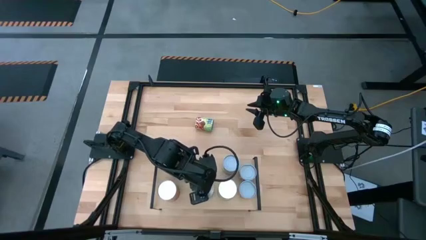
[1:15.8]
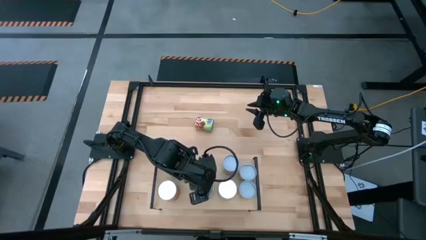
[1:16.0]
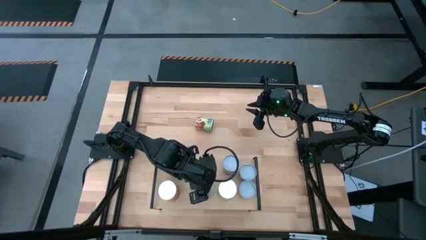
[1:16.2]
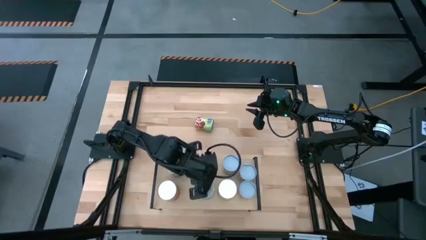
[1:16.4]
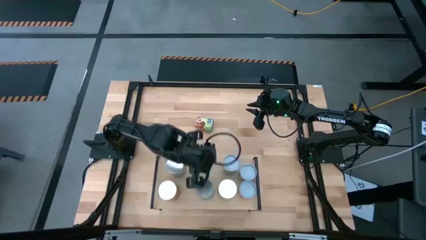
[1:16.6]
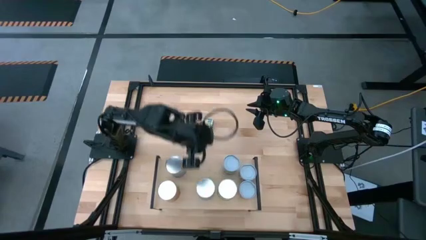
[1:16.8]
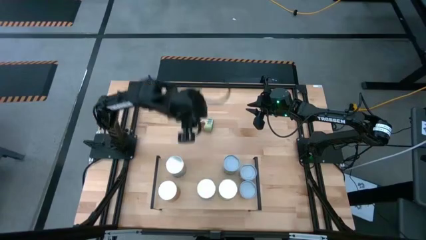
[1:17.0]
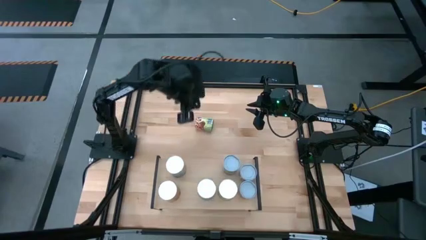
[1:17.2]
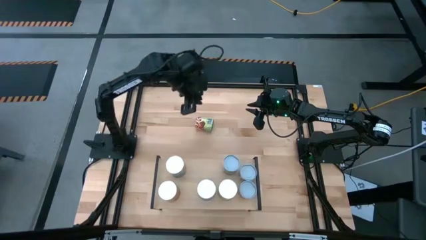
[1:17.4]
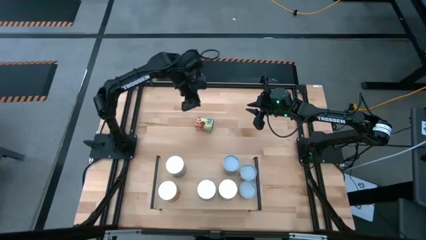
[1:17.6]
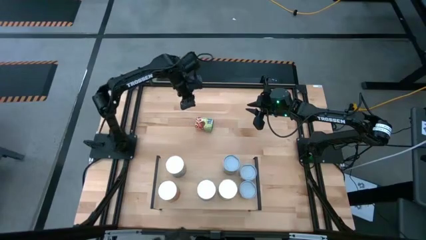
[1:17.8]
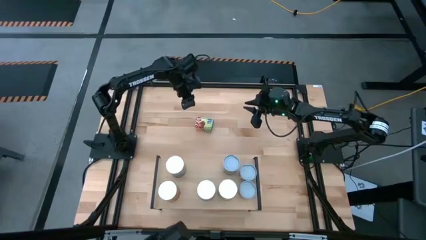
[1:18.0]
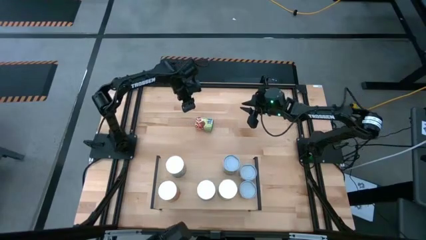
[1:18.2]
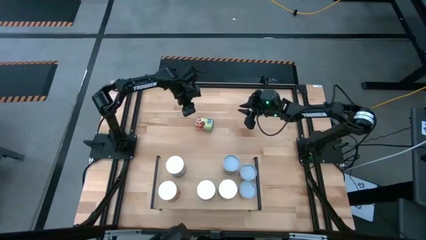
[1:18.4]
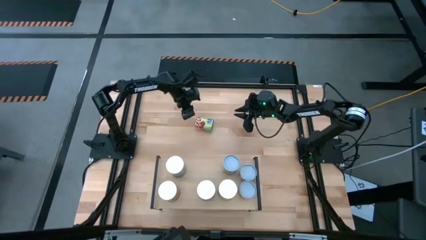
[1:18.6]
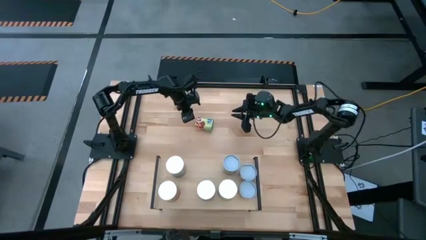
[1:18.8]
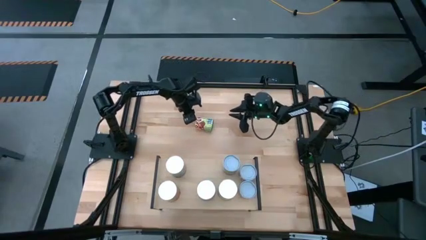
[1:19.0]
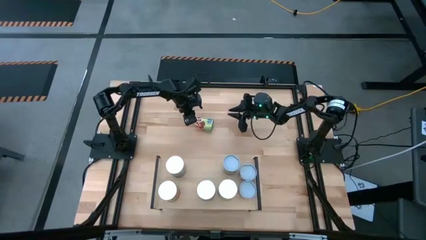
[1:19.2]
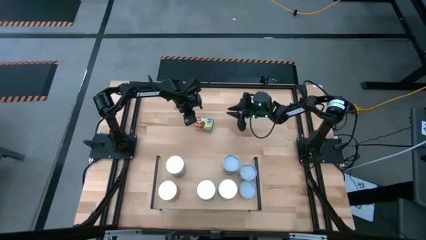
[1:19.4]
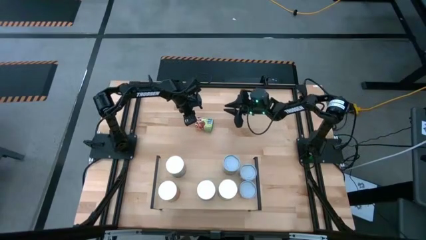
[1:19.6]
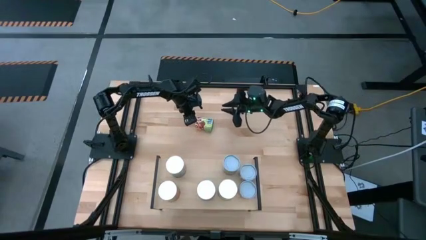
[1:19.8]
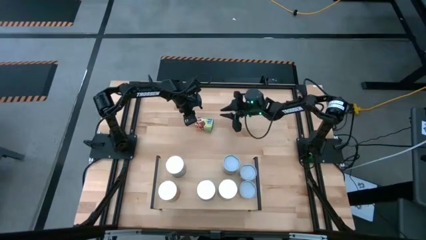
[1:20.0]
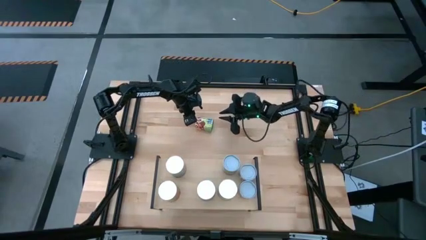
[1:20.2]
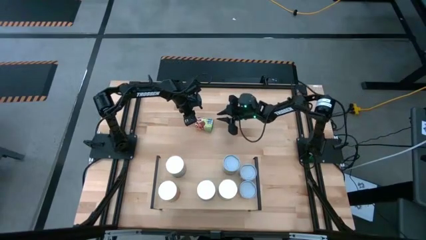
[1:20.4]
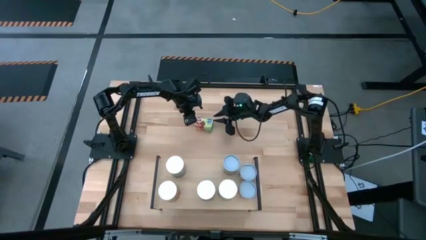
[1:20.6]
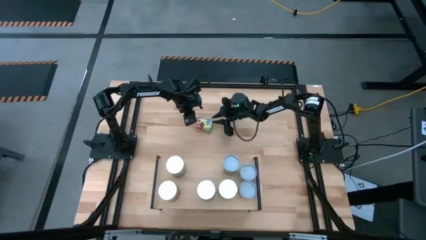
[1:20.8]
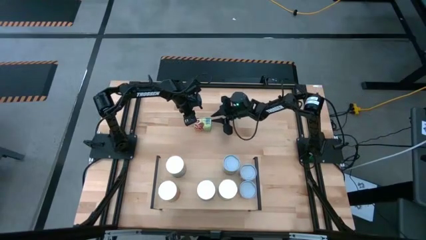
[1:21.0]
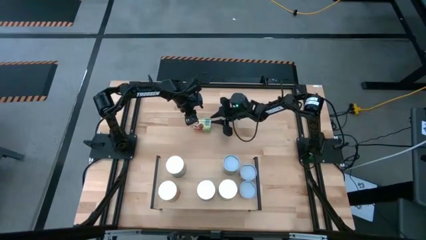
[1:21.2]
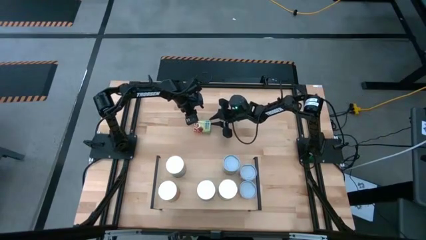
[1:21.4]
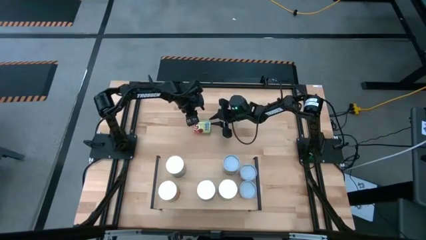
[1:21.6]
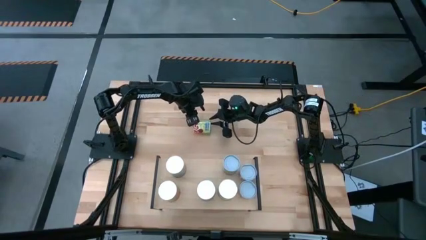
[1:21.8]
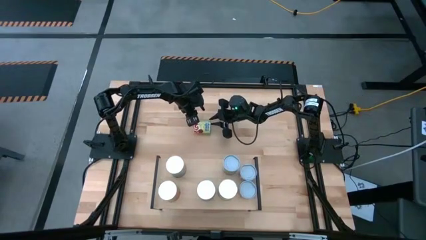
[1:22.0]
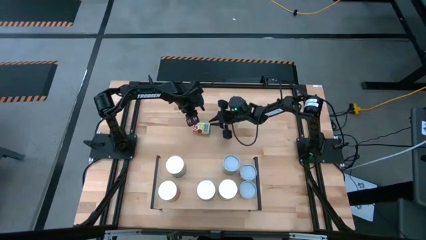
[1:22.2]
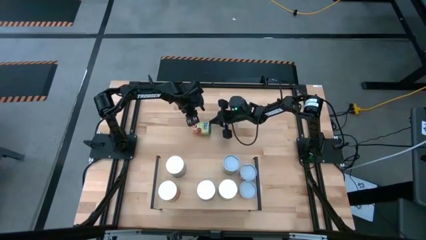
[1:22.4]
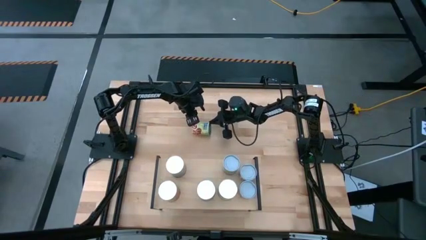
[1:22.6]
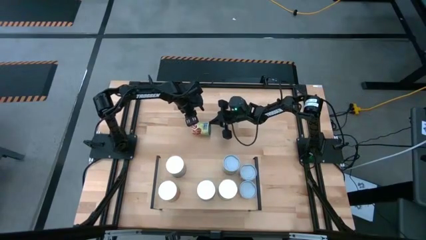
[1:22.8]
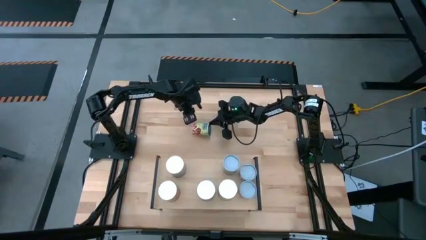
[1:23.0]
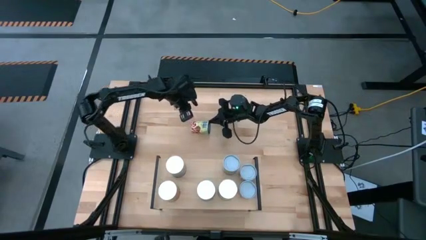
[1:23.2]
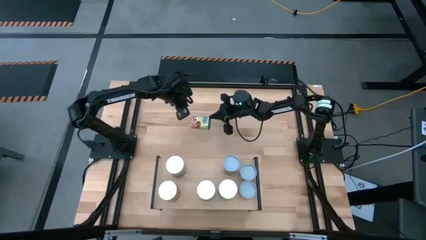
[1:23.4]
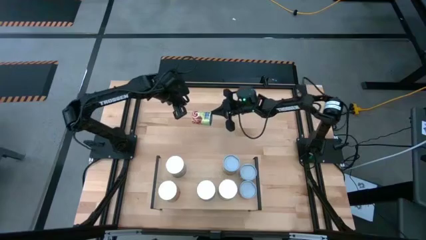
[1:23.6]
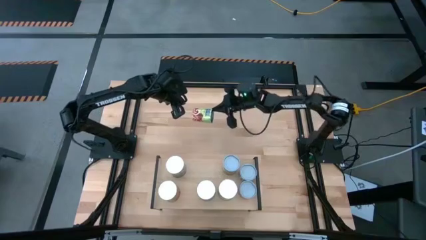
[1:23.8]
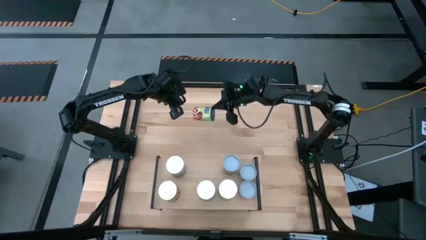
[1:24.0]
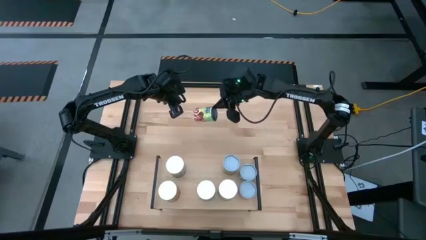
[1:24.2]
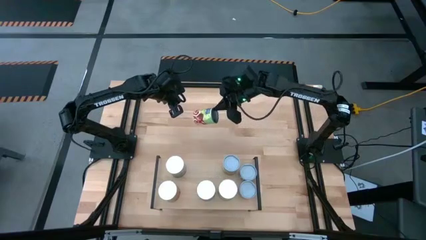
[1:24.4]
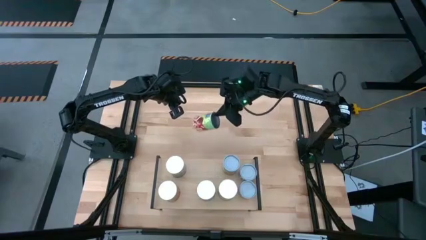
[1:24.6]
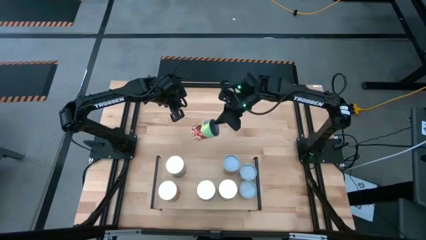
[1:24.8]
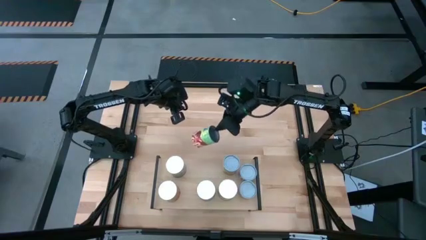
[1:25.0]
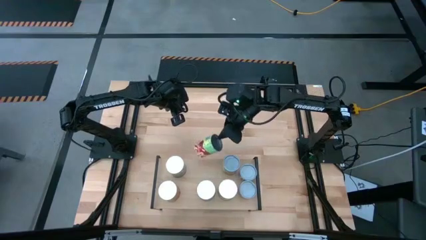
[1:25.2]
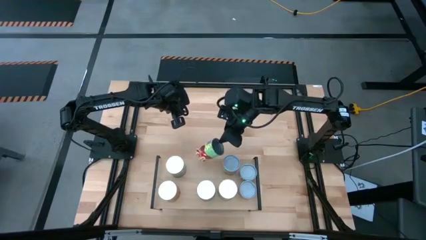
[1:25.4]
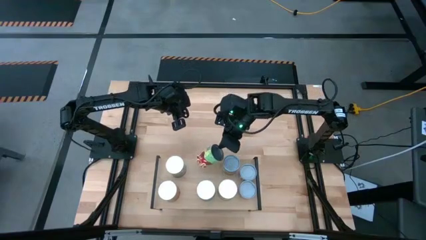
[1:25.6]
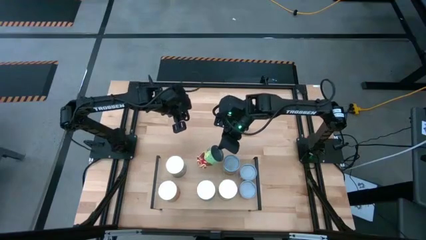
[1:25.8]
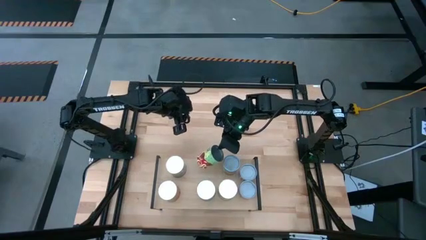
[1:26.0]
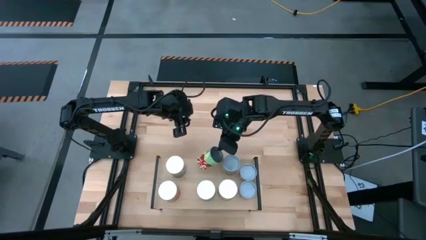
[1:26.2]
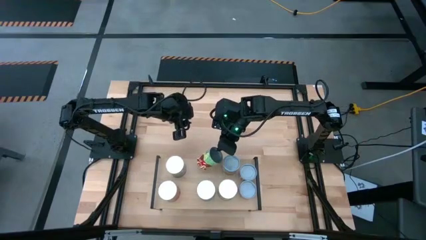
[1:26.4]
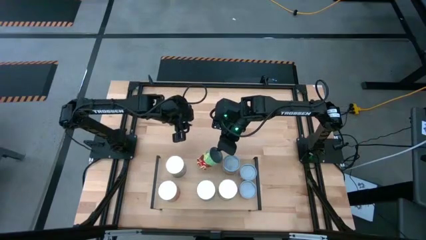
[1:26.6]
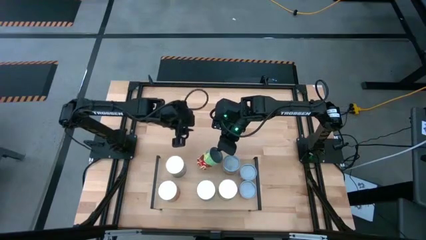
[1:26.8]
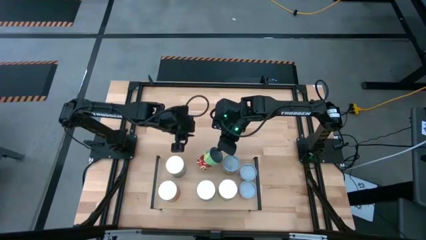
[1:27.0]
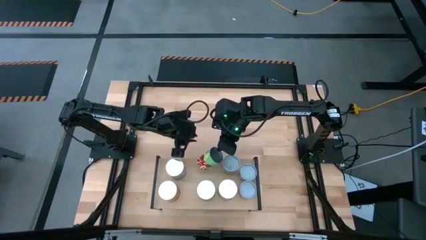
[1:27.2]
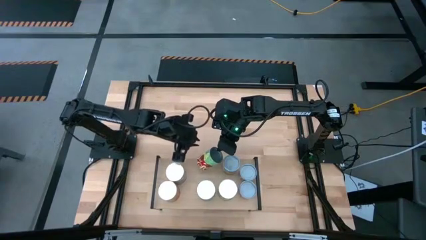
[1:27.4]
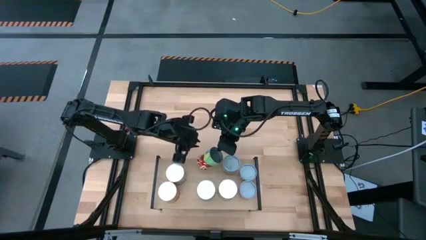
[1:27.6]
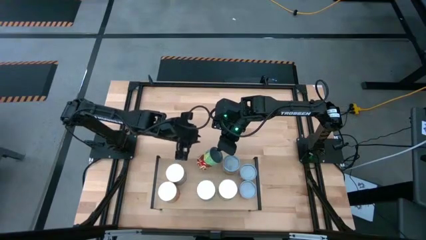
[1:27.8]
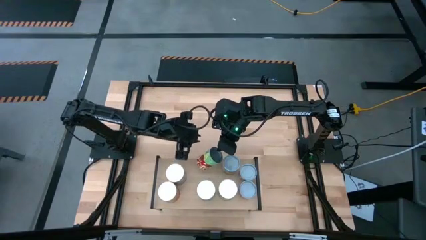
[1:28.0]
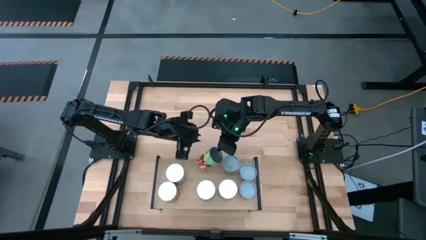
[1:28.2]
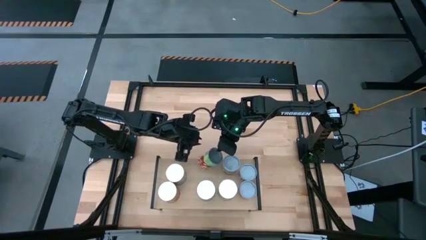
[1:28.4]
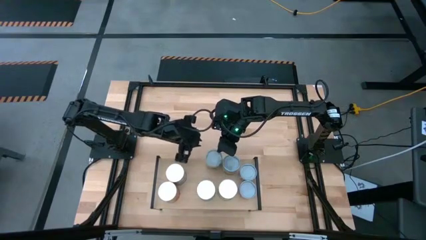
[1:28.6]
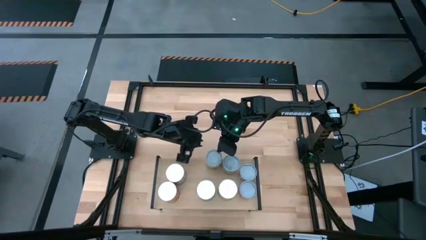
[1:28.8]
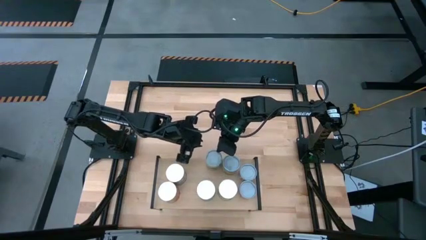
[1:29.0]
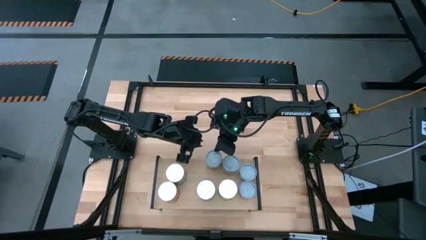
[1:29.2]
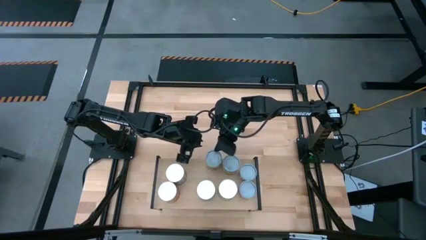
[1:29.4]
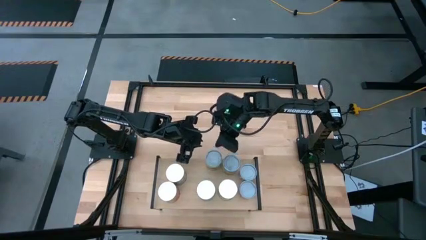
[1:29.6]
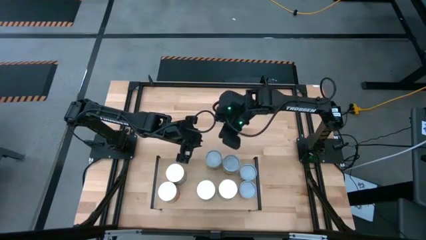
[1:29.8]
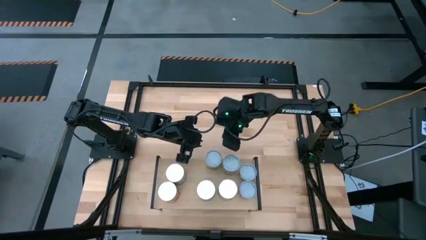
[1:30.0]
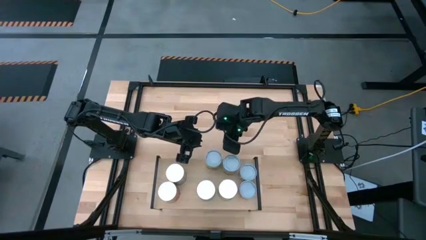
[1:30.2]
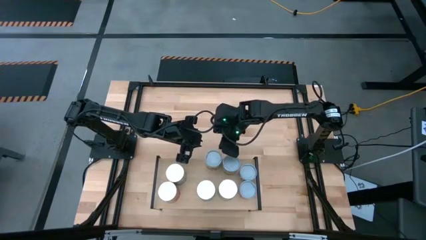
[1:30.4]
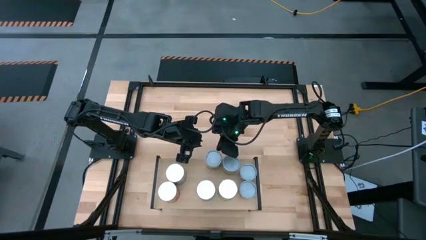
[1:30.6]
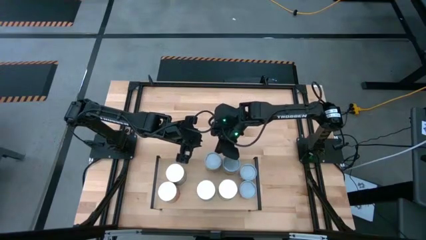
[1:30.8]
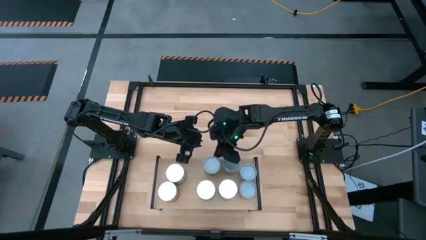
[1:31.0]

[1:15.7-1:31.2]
Task: Pick and place cans onto a shelf
Put the canned spaghetti sauce on the shelf
